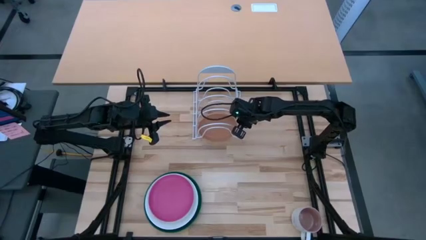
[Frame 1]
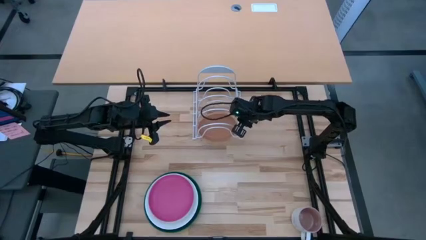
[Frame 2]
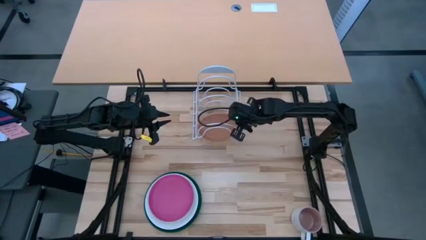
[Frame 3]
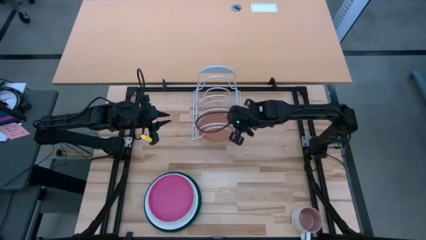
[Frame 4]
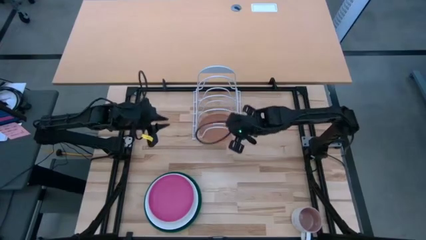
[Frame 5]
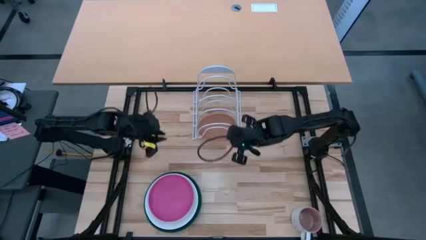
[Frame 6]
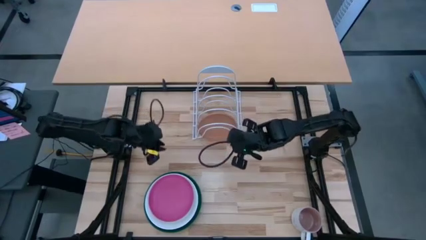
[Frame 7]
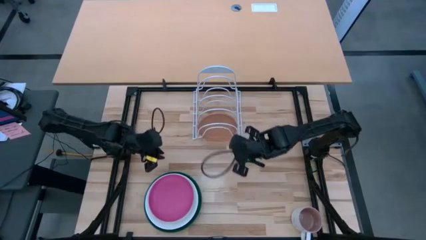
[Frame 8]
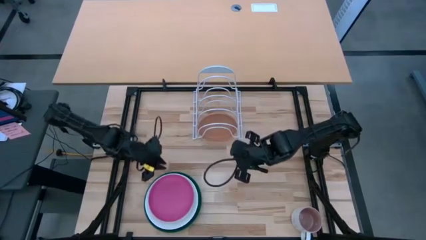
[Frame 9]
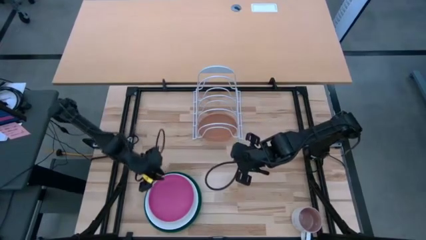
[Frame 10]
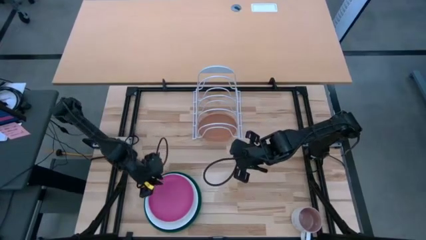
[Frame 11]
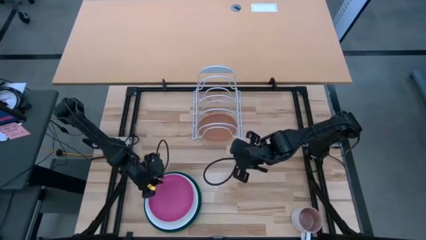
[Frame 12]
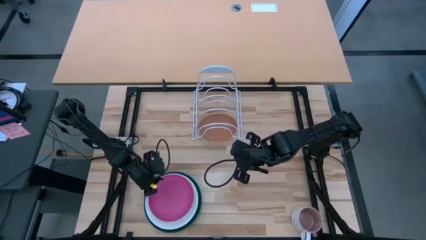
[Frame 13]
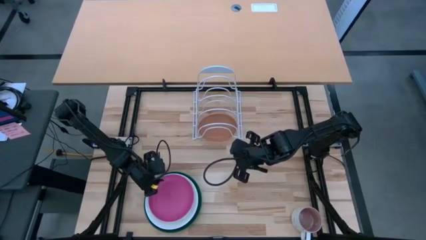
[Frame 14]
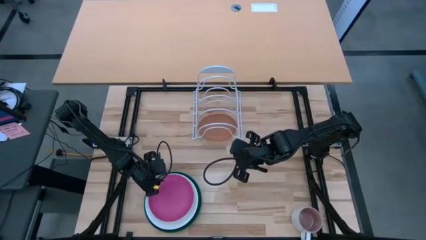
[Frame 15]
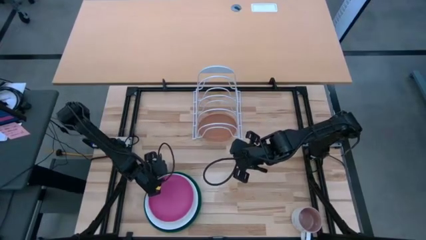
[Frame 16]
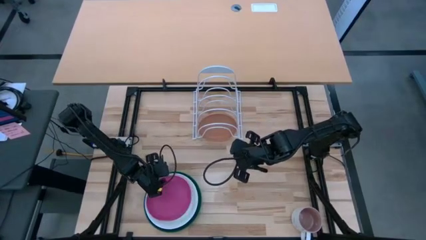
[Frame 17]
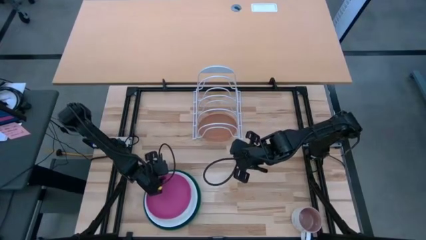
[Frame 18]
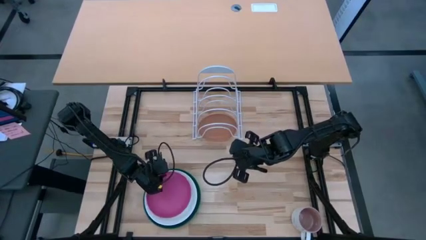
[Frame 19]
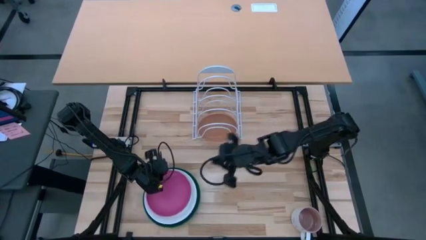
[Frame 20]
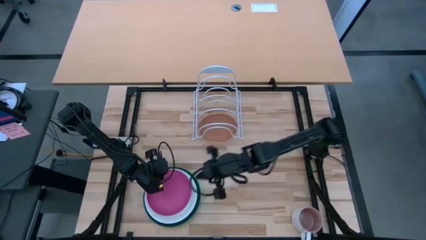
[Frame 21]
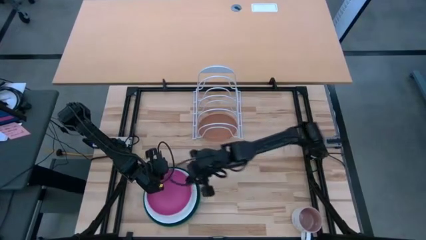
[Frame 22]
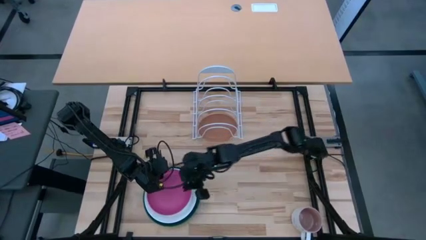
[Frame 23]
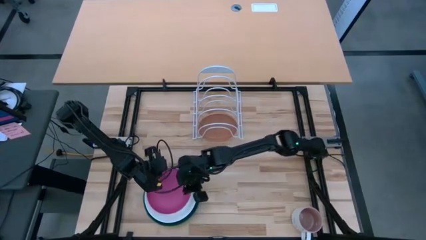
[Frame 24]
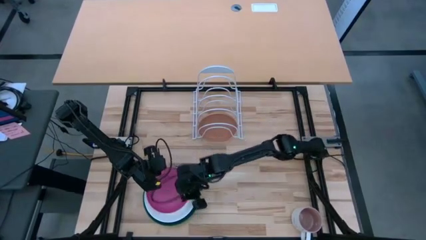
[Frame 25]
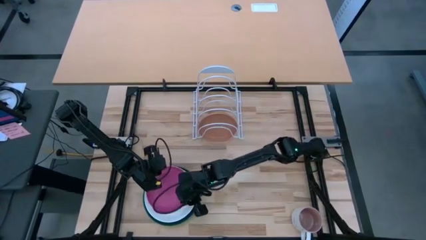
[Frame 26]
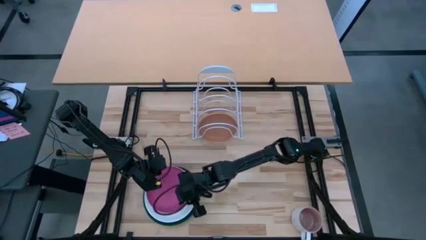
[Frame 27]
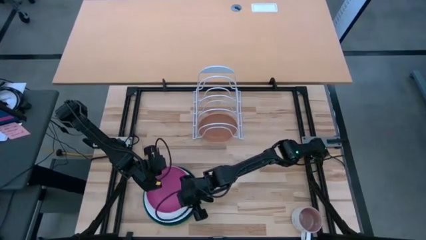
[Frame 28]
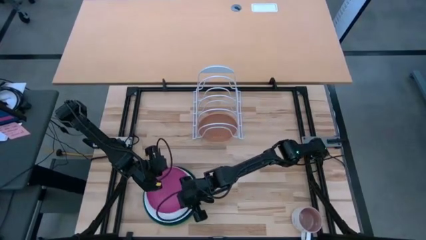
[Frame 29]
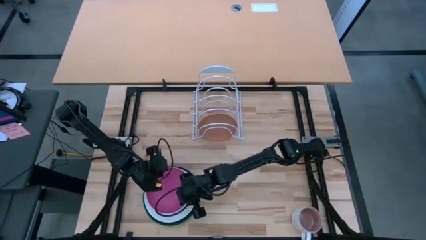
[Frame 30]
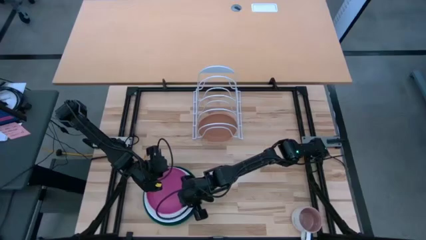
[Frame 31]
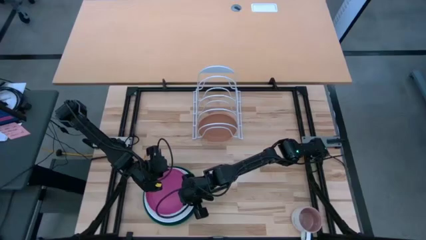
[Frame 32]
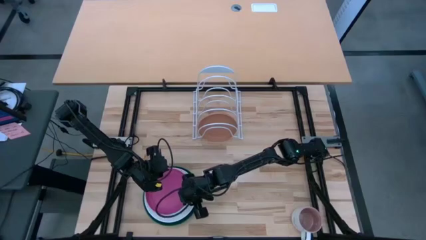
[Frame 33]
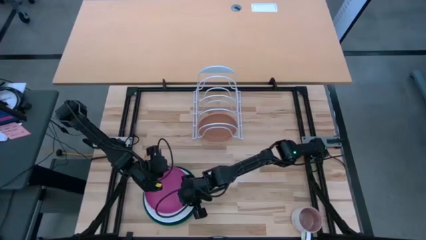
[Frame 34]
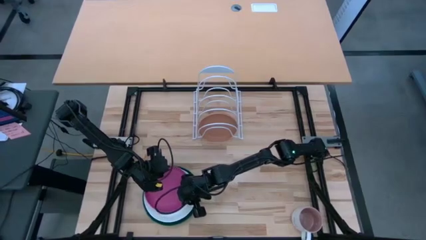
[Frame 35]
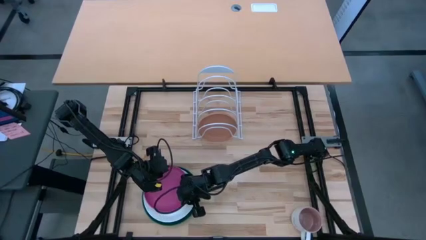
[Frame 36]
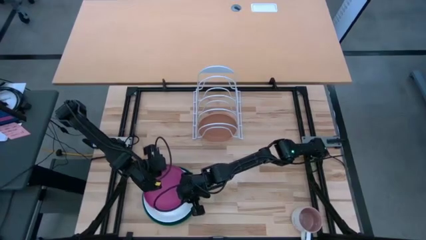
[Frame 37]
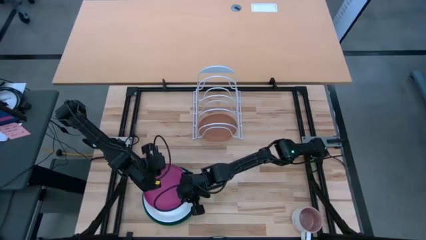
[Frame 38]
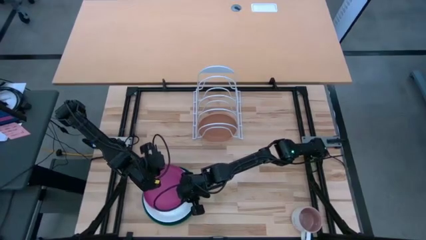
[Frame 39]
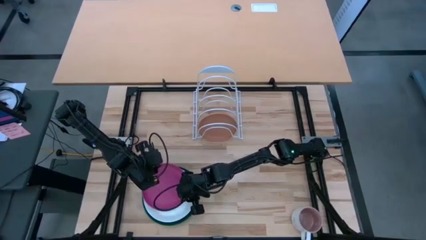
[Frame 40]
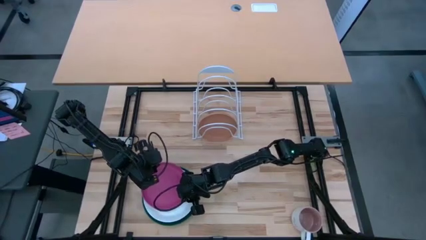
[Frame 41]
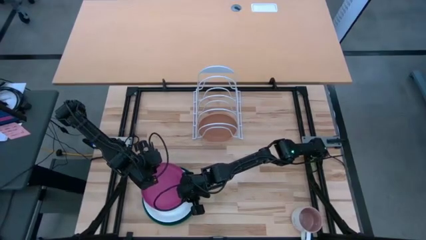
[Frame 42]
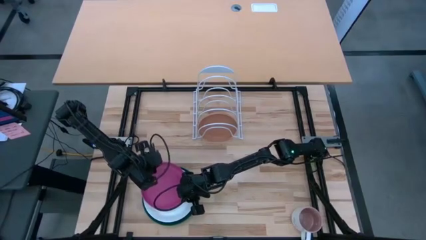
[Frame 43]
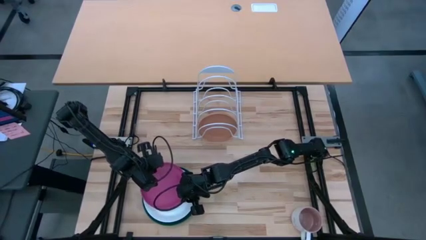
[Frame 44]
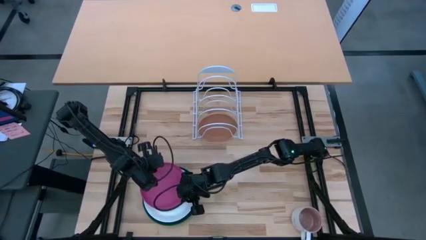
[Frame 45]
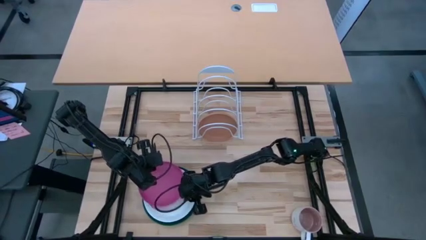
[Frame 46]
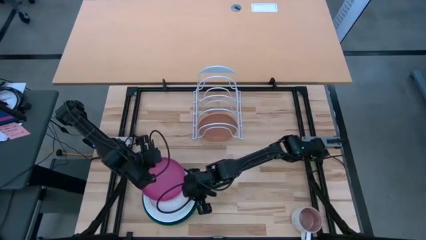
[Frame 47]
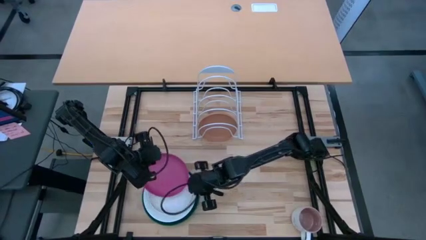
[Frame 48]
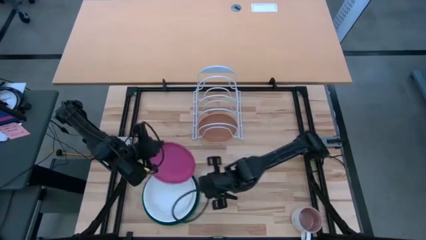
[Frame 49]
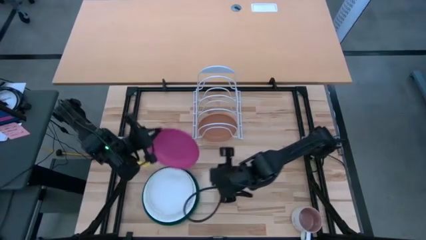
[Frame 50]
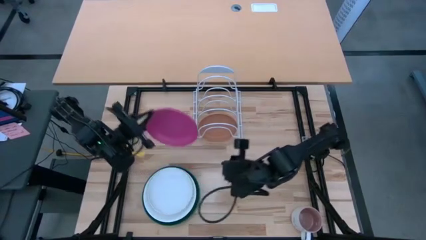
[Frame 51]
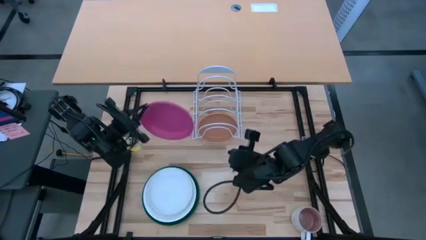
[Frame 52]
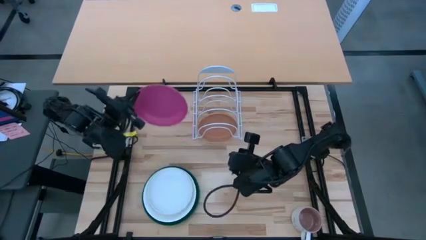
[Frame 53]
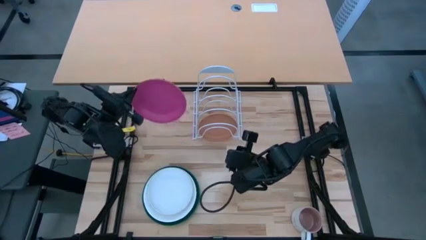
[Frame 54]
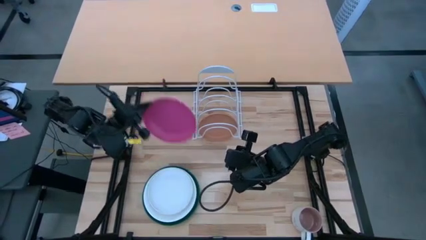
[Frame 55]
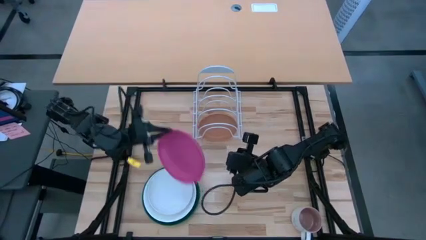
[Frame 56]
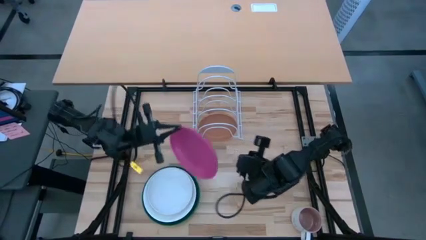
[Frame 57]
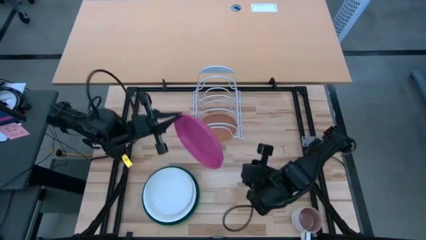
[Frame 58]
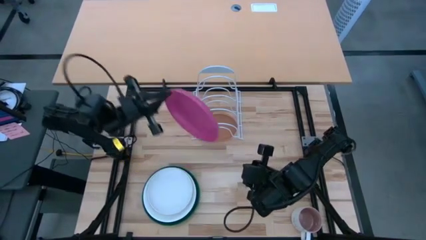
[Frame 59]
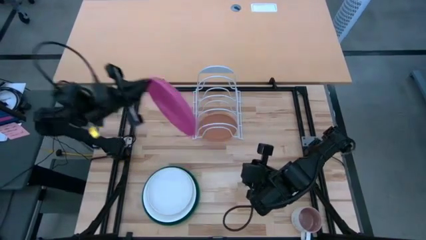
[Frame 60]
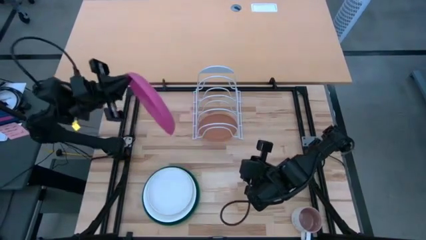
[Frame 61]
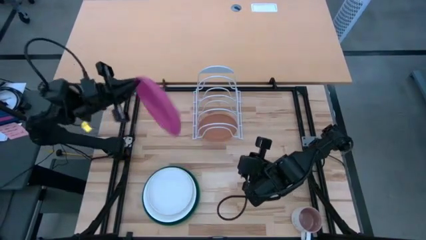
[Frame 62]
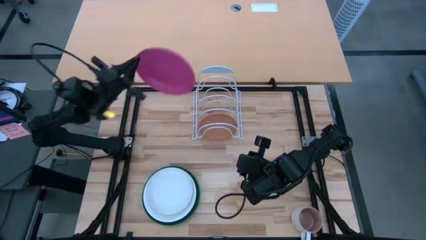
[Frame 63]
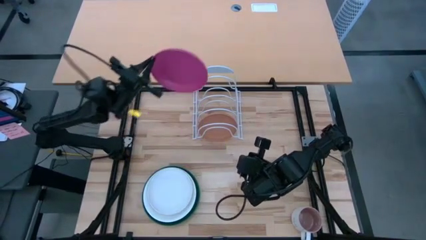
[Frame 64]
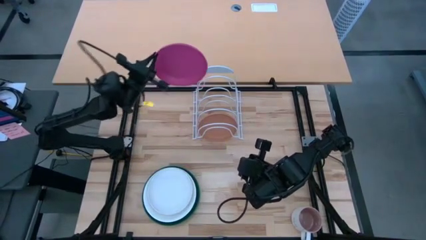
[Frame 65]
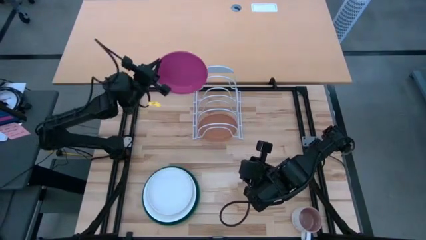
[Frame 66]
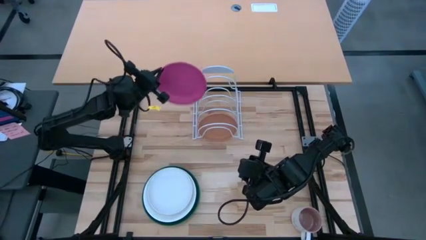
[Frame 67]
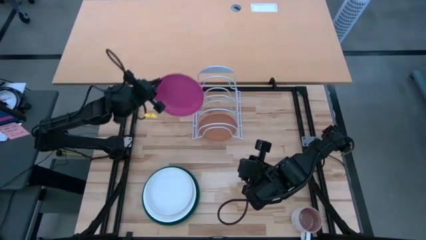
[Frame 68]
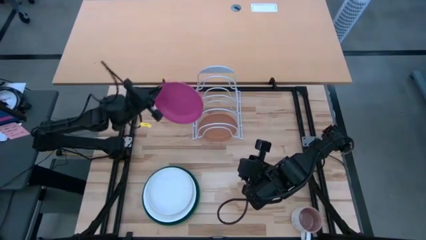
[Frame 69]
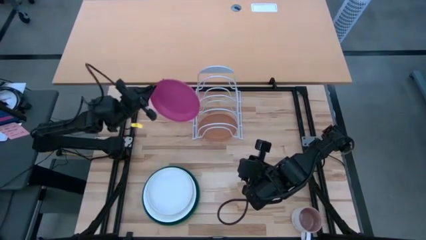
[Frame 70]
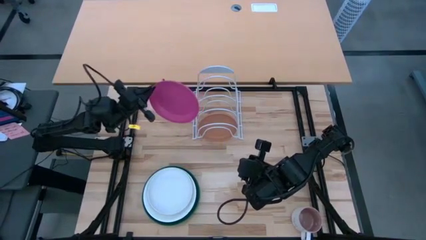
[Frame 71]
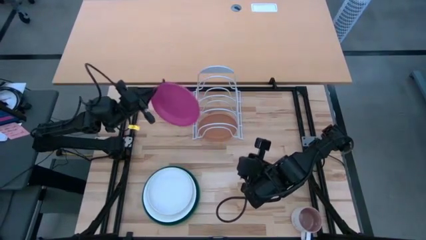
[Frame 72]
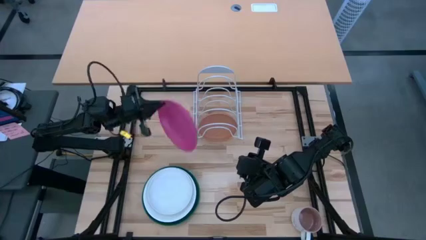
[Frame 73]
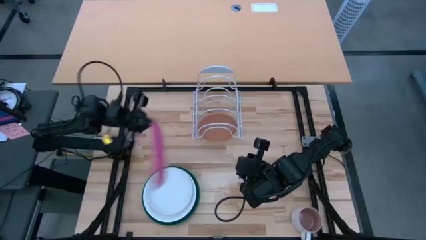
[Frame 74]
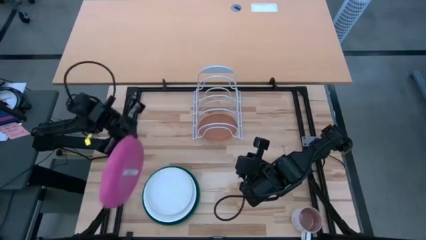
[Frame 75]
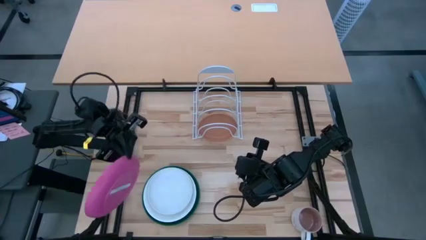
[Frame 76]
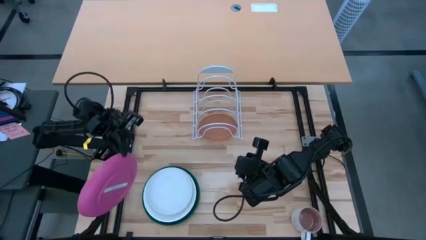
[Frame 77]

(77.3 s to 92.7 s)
Task: Sort dishes
Put the pink plate on the dish rack
